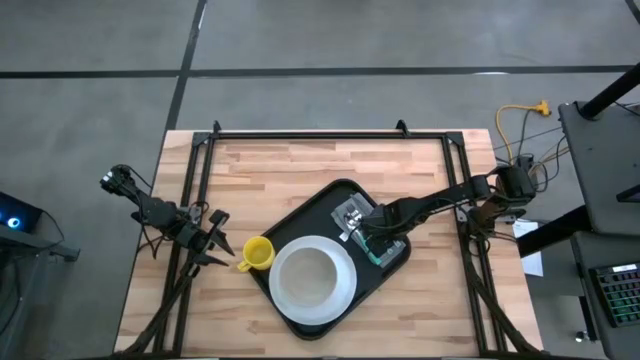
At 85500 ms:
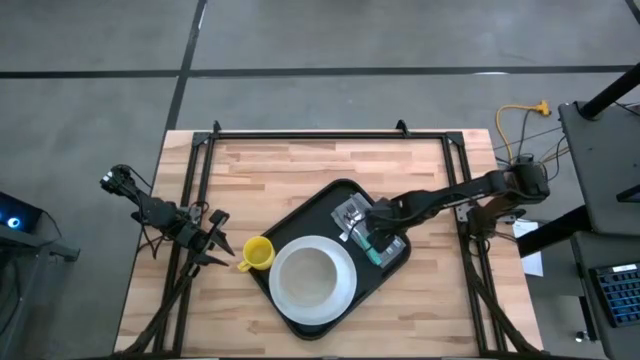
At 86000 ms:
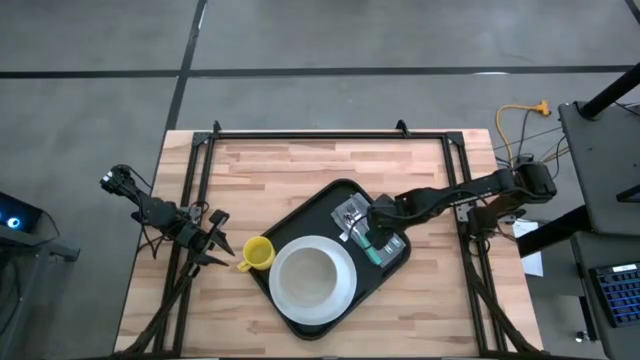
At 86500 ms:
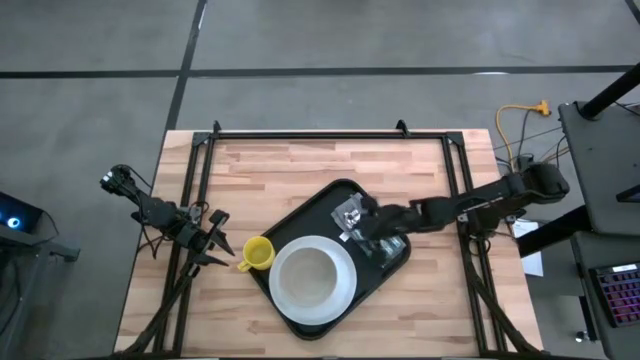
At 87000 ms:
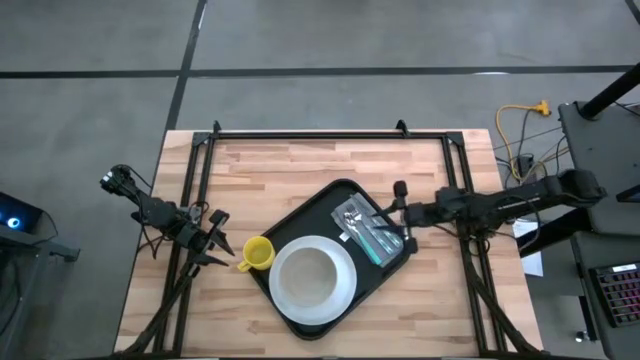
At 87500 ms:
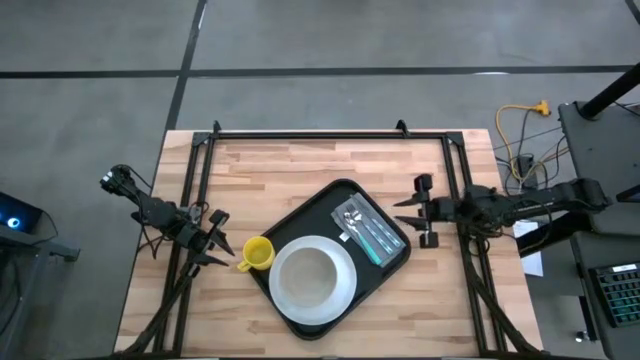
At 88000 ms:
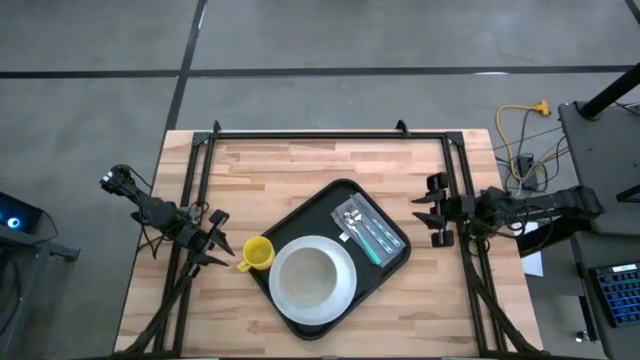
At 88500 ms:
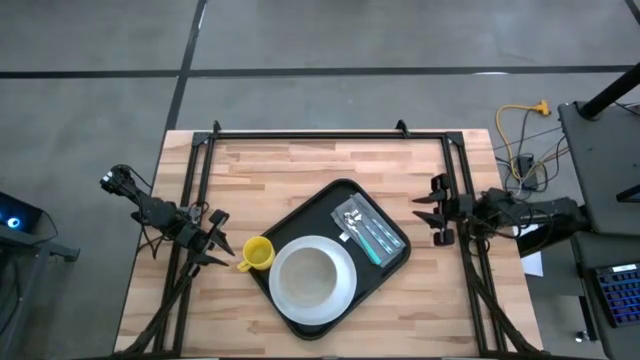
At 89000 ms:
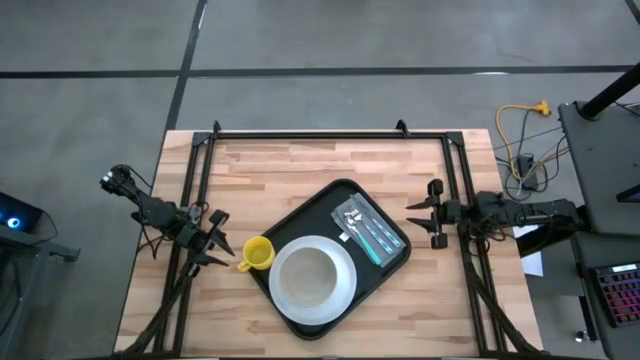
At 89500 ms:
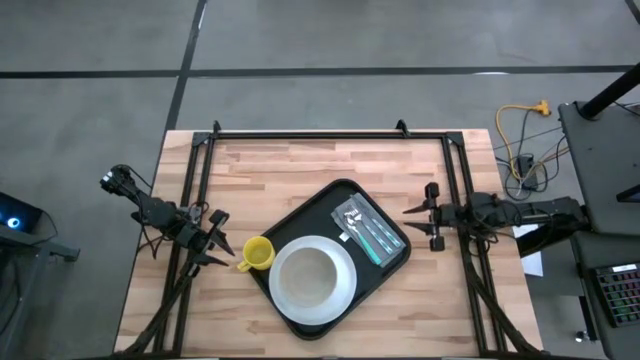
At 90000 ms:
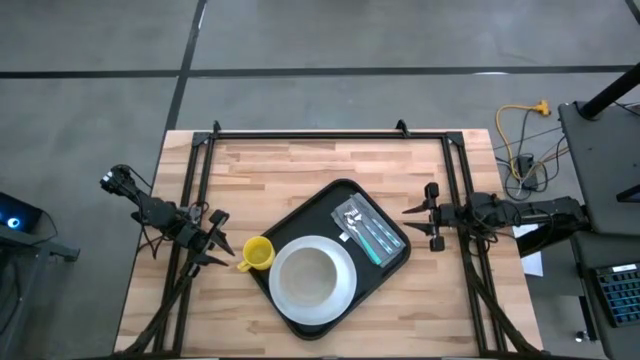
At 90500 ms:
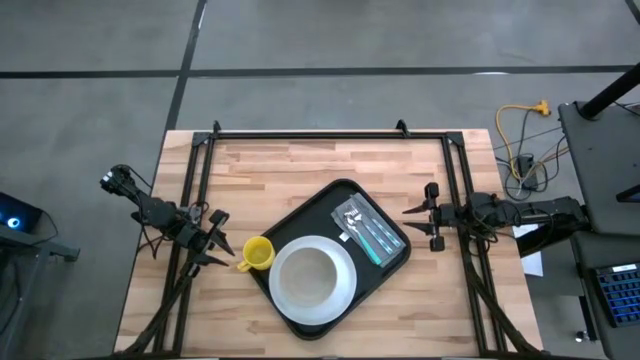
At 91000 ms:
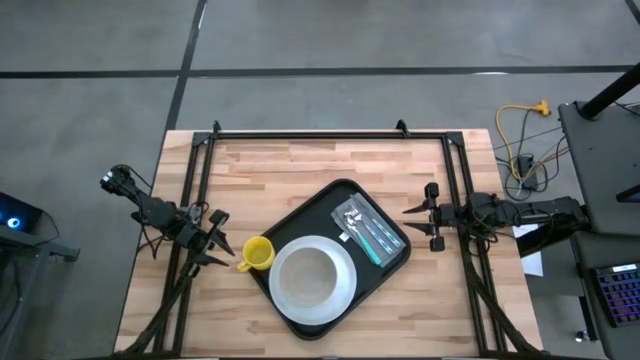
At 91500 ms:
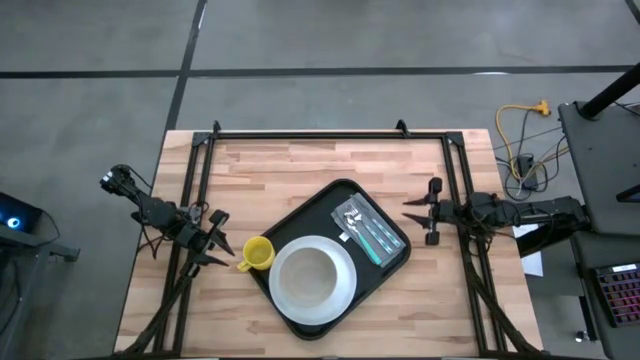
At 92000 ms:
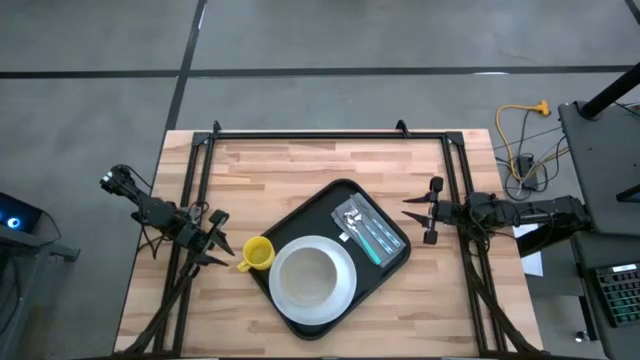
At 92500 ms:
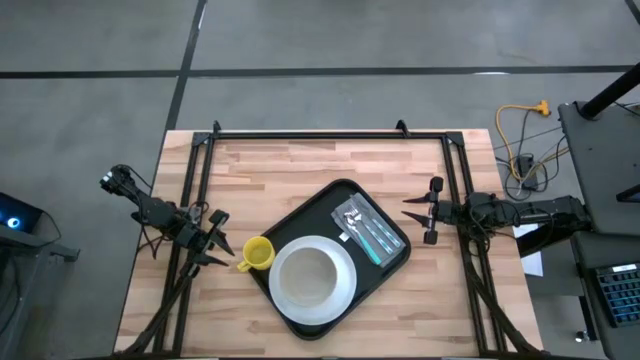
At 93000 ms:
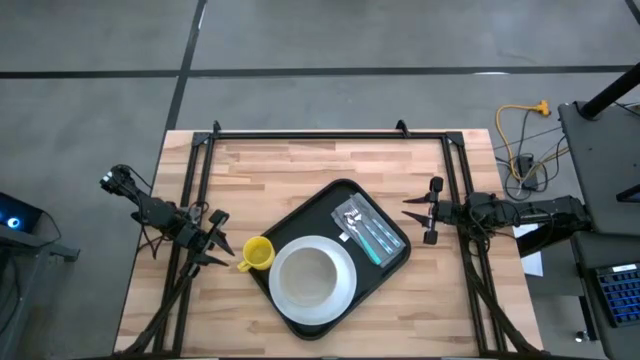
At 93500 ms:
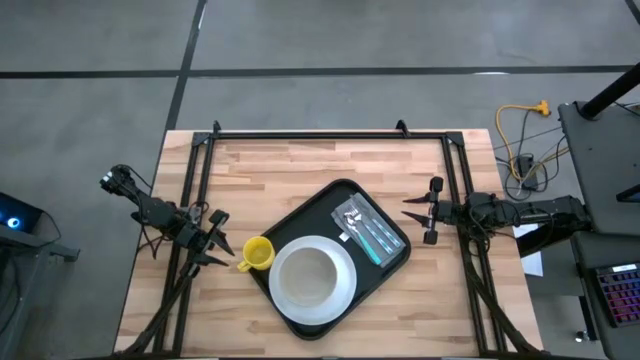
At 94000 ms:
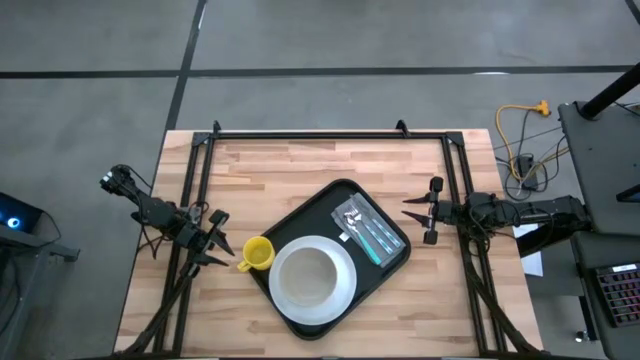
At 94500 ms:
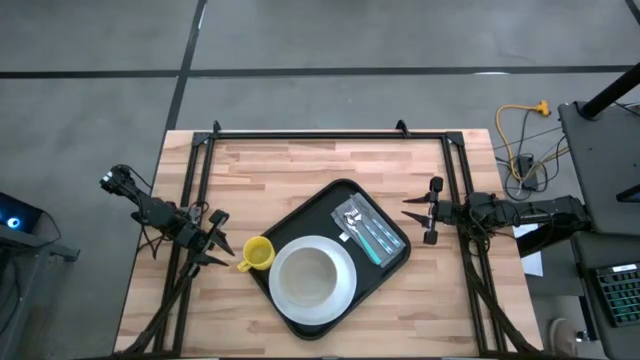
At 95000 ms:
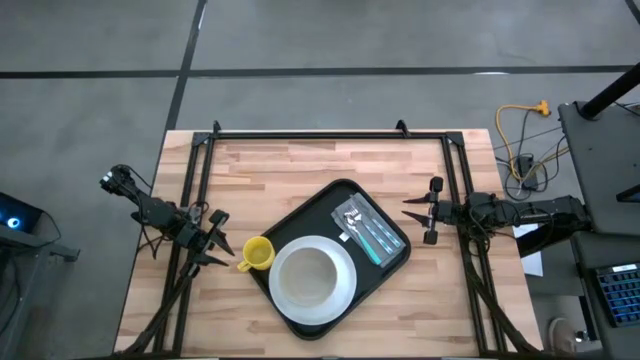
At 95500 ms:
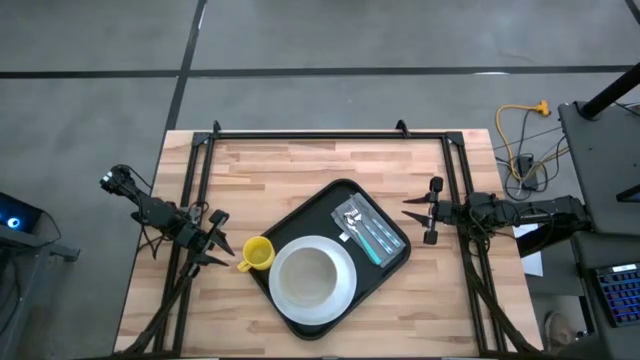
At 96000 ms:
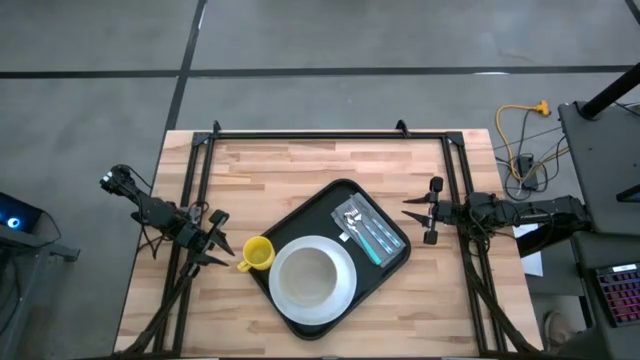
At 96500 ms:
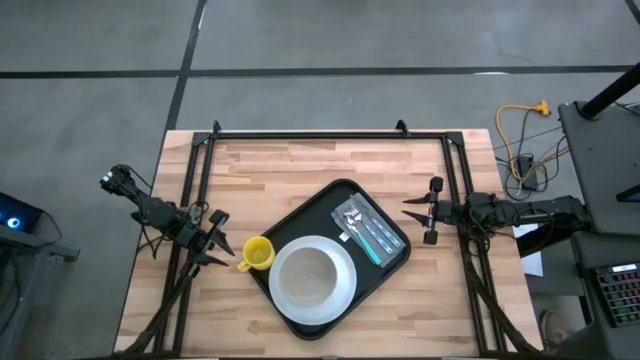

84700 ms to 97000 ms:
Task: Set up tray
Return to Home Position

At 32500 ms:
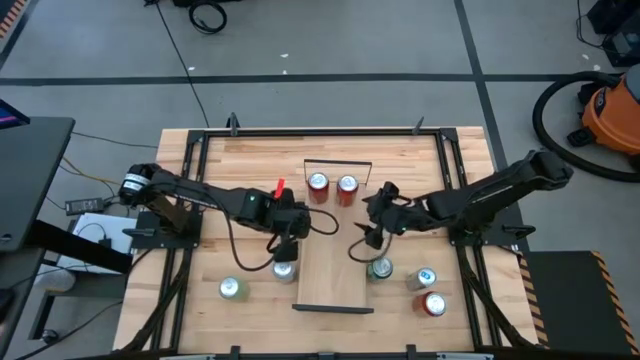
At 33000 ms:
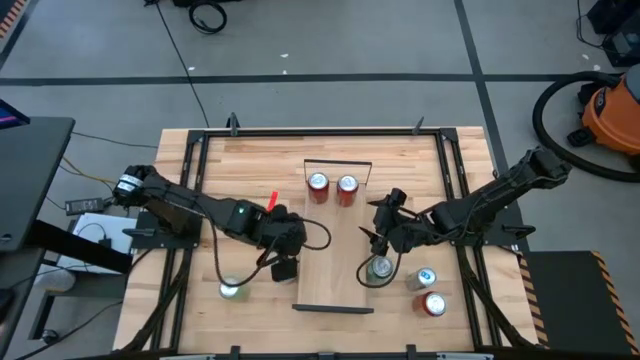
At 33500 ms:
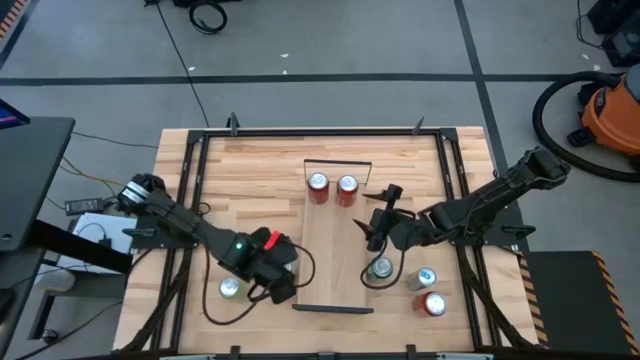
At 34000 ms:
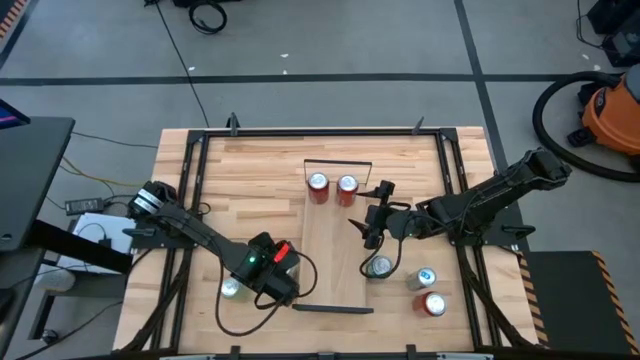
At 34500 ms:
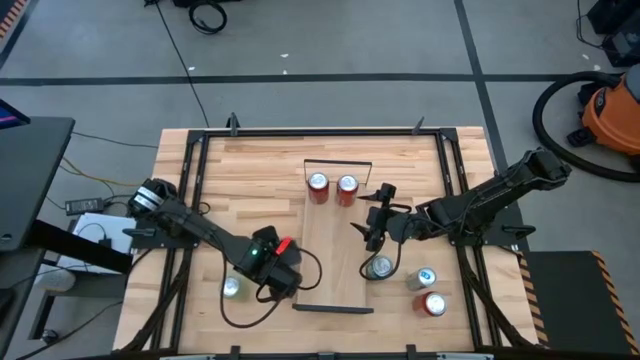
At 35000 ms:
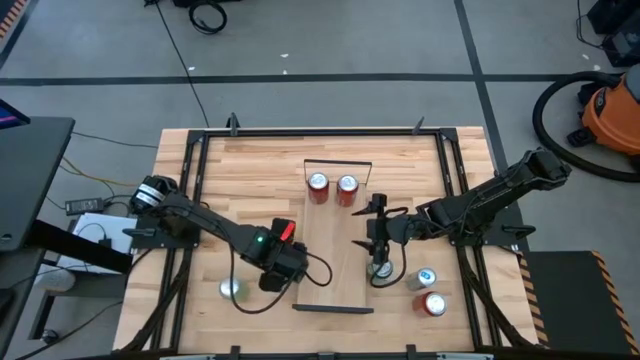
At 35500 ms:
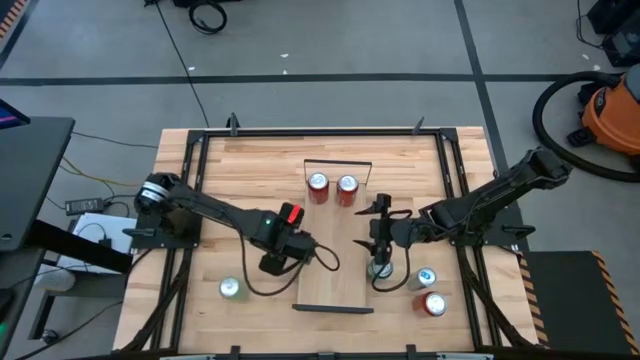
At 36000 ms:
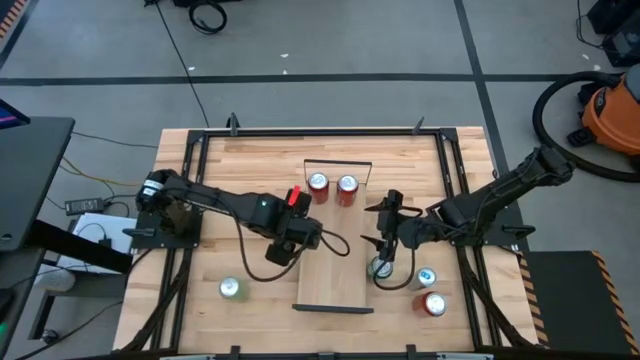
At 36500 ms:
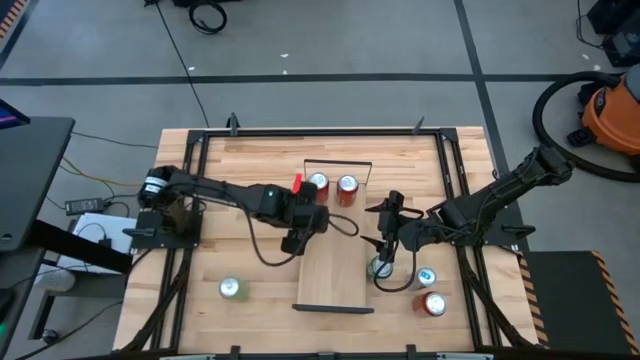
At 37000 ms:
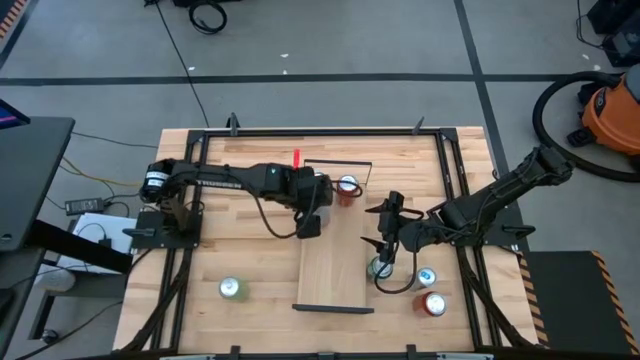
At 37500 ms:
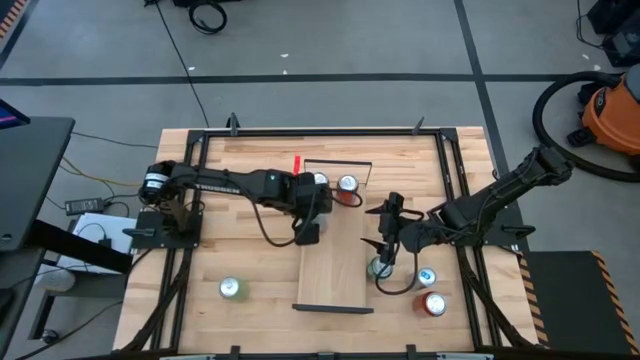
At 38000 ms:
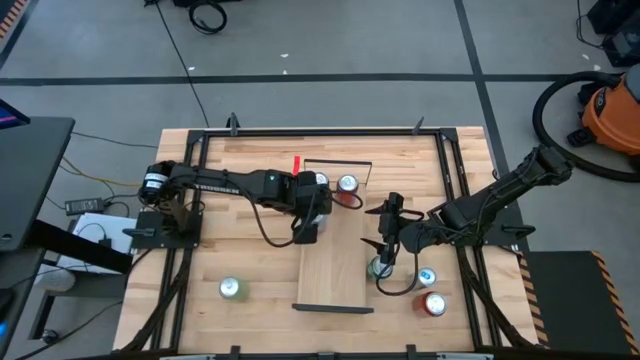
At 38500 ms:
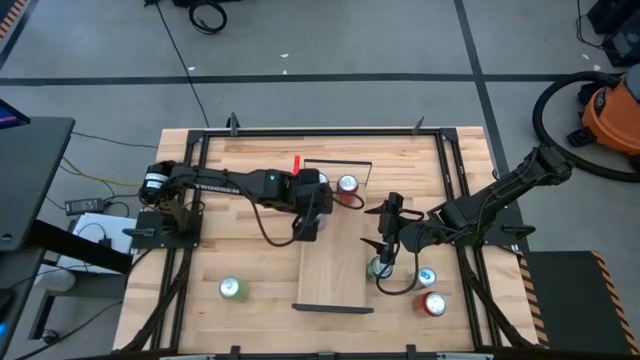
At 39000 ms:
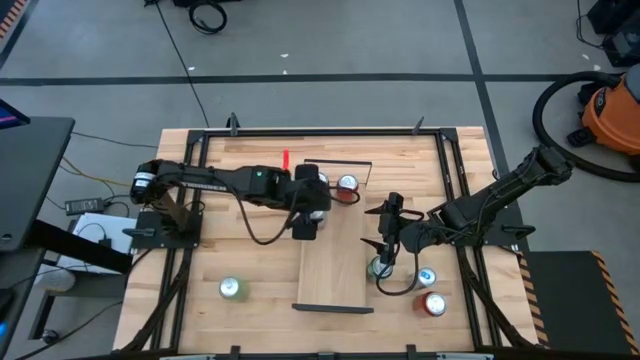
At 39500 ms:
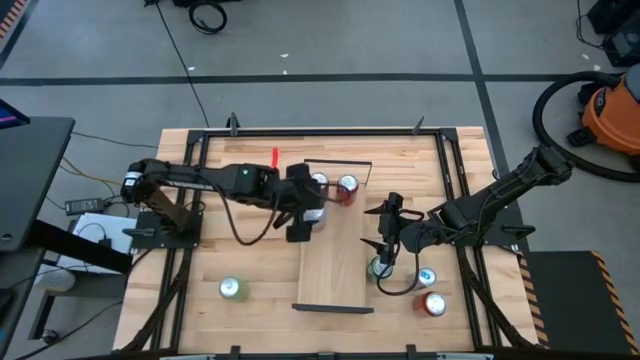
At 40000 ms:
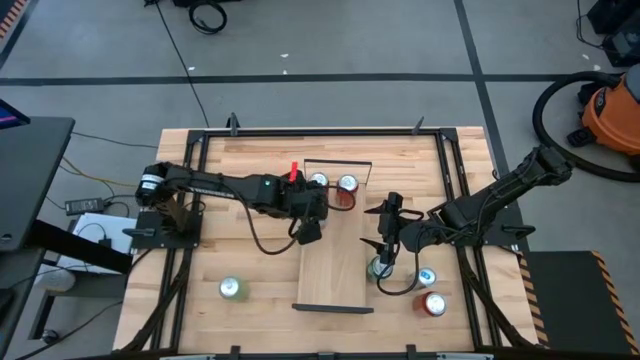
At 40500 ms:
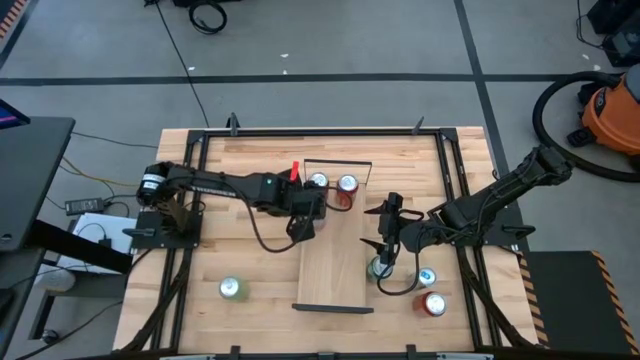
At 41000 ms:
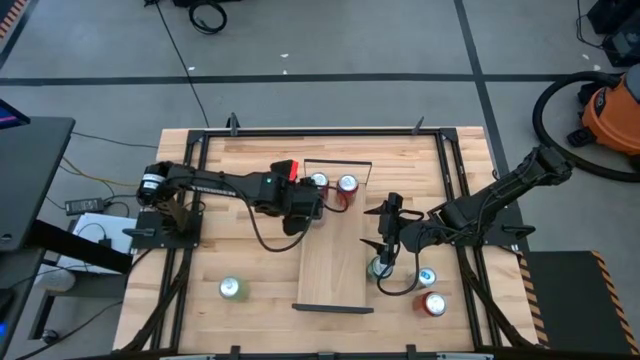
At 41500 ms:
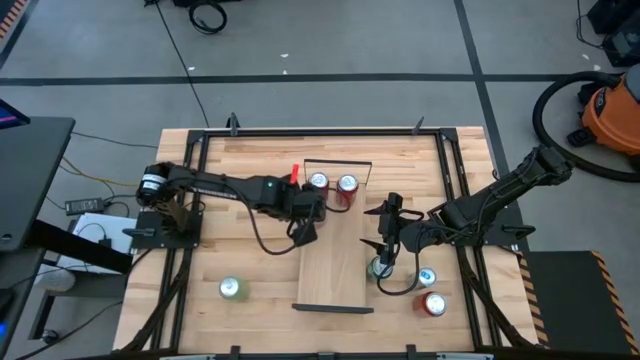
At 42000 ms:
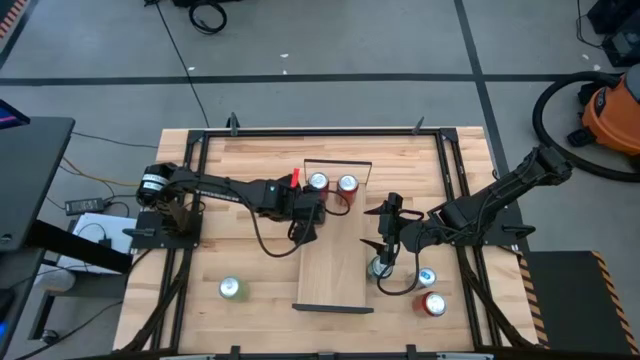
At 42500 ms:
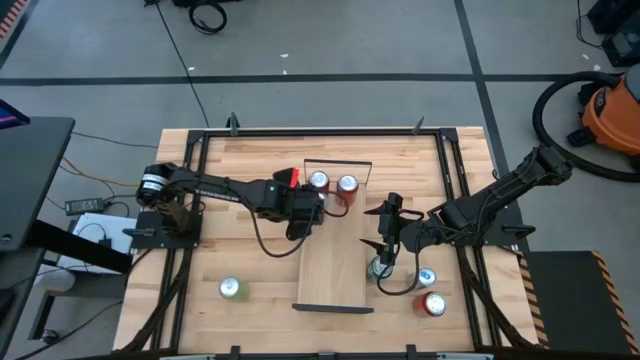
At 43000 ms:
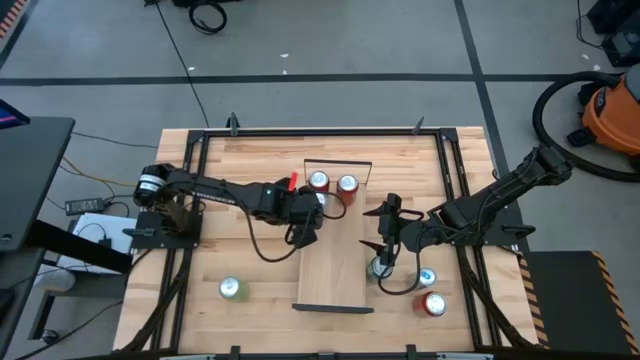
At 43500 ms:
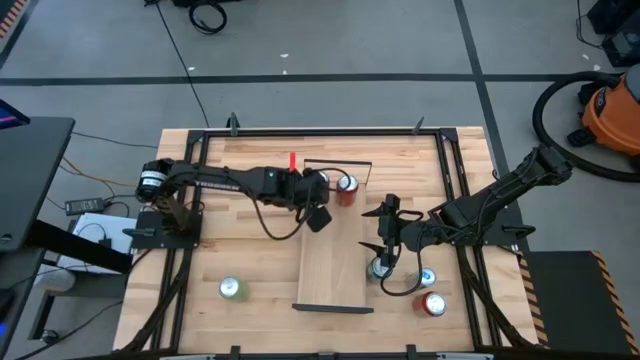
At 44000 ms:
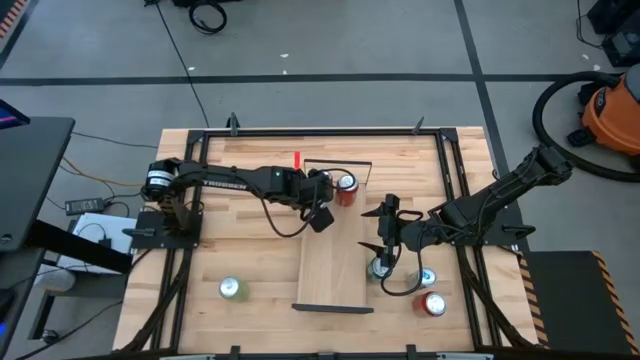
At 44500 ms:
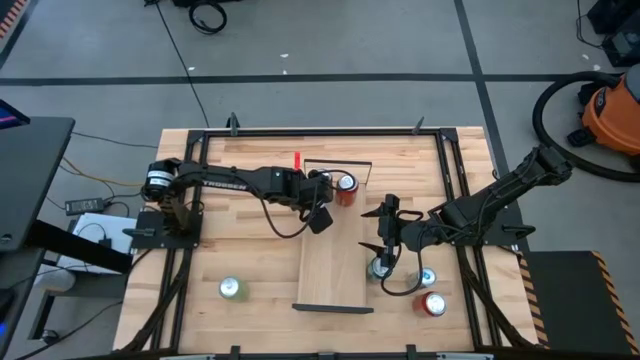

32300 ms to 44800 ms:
Task: Place canned beverage on shelf
Put the yellow/white soda can on the shelf
